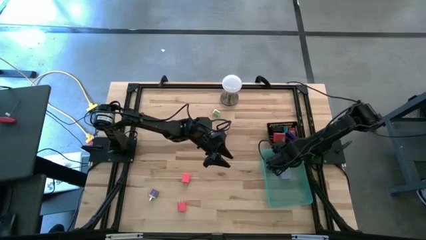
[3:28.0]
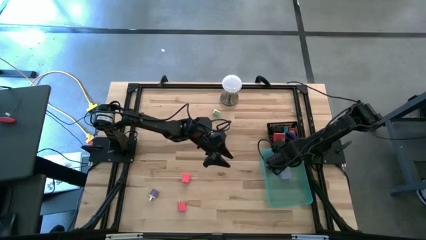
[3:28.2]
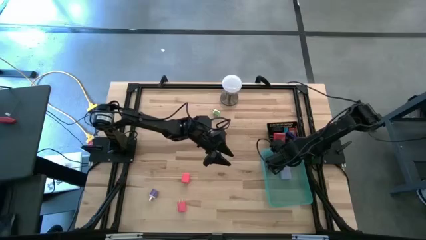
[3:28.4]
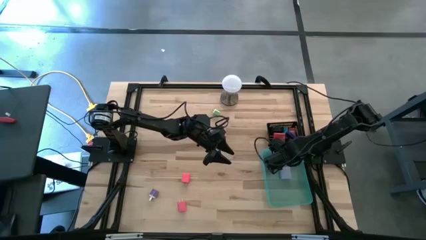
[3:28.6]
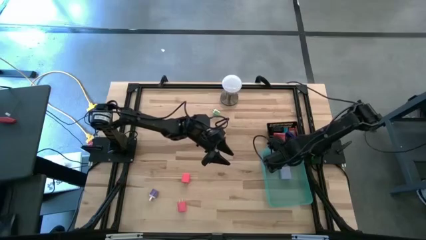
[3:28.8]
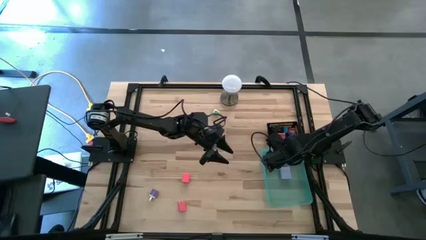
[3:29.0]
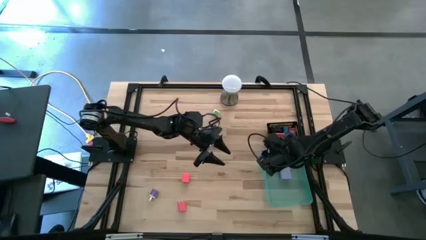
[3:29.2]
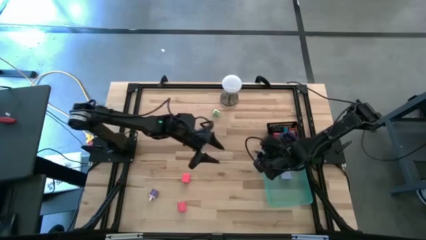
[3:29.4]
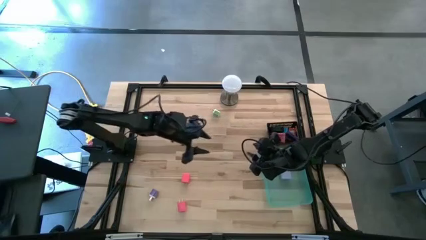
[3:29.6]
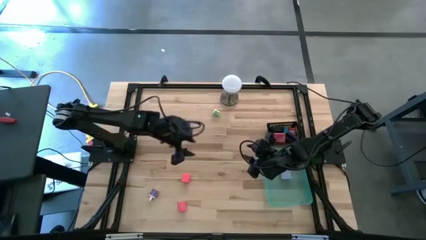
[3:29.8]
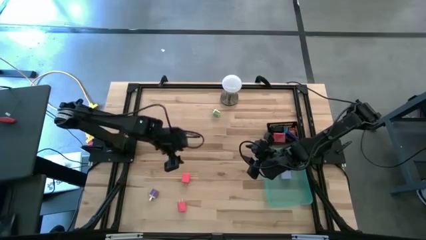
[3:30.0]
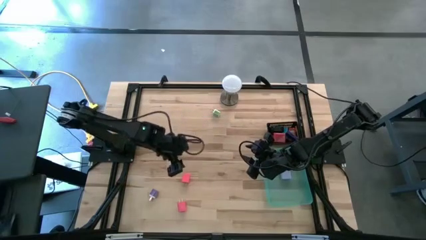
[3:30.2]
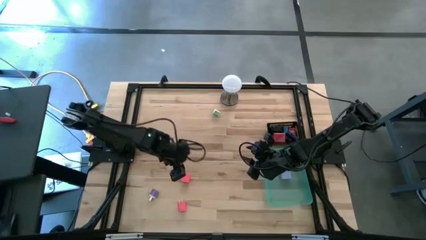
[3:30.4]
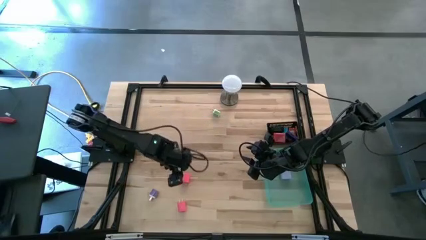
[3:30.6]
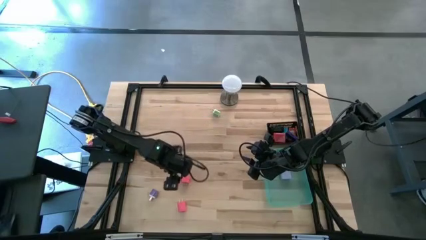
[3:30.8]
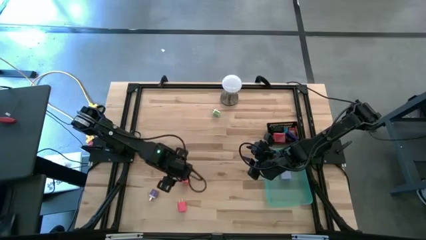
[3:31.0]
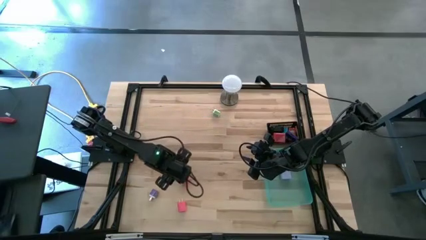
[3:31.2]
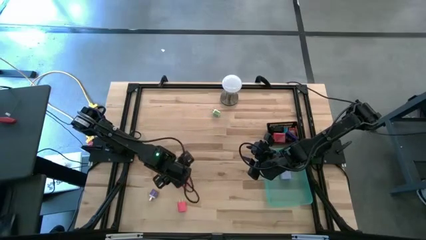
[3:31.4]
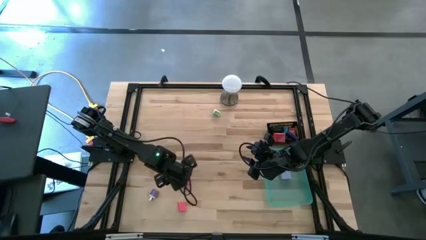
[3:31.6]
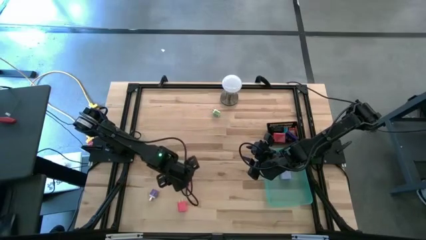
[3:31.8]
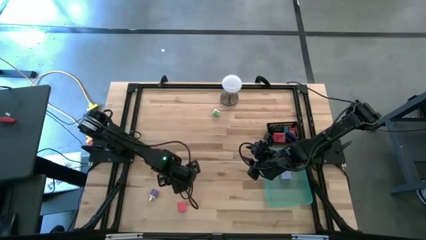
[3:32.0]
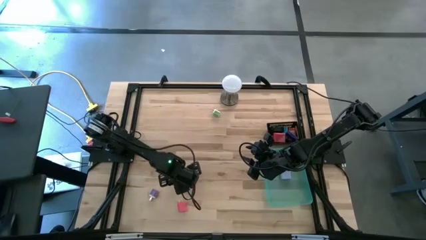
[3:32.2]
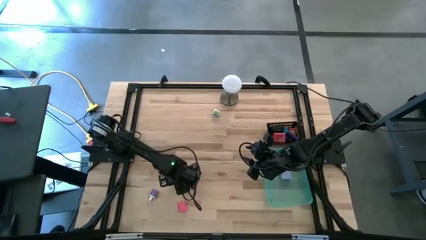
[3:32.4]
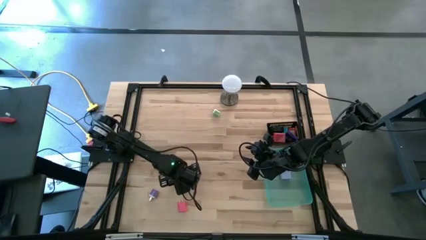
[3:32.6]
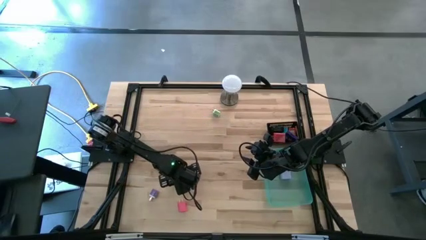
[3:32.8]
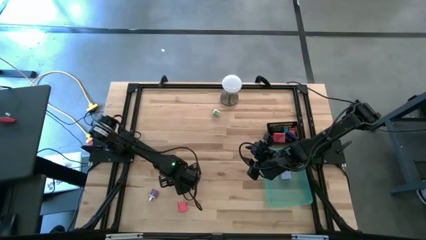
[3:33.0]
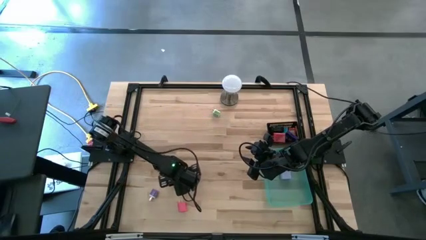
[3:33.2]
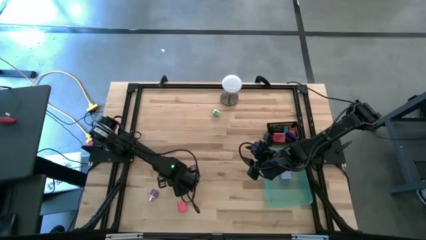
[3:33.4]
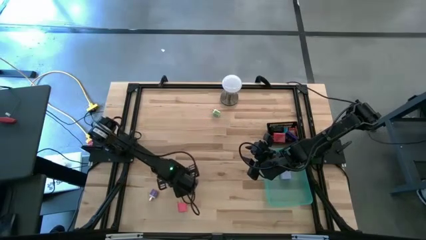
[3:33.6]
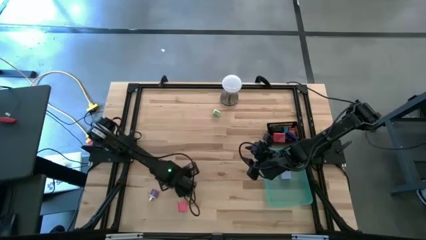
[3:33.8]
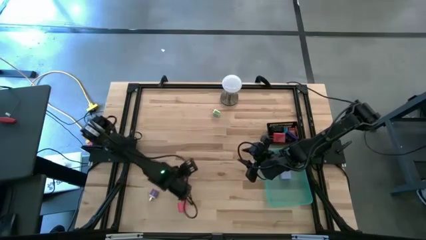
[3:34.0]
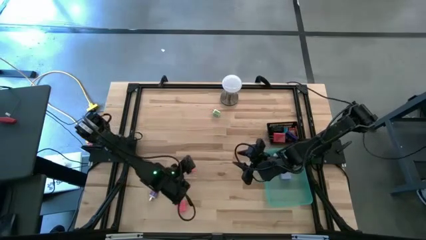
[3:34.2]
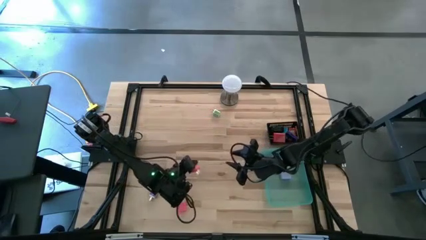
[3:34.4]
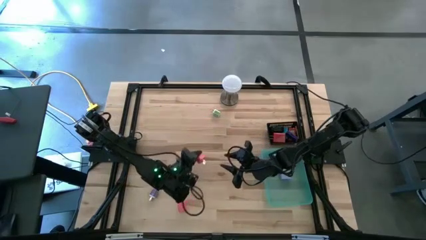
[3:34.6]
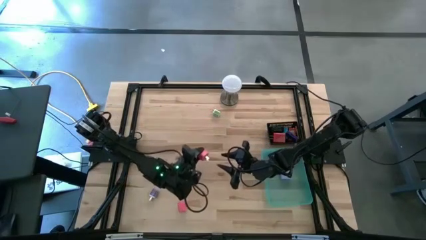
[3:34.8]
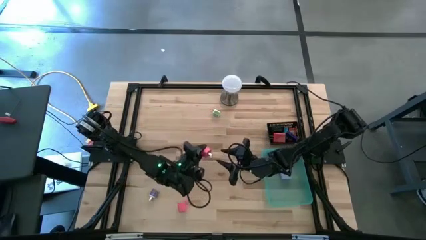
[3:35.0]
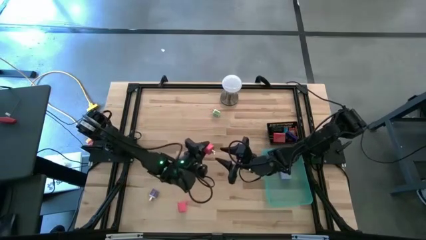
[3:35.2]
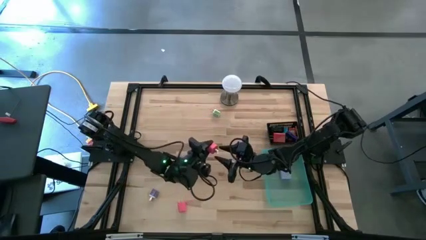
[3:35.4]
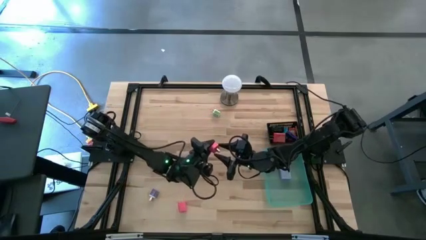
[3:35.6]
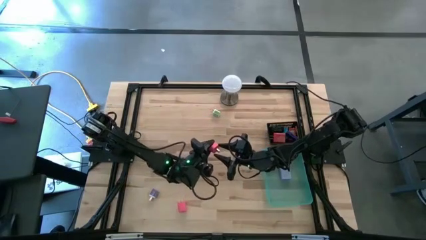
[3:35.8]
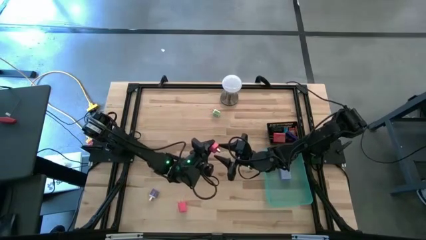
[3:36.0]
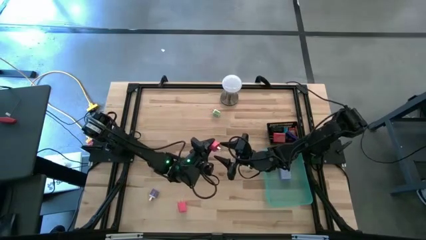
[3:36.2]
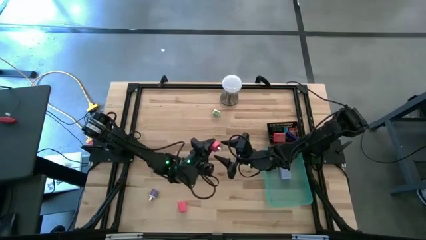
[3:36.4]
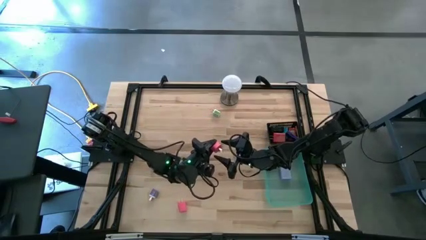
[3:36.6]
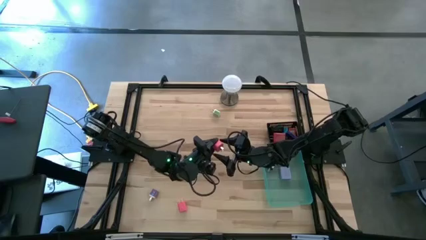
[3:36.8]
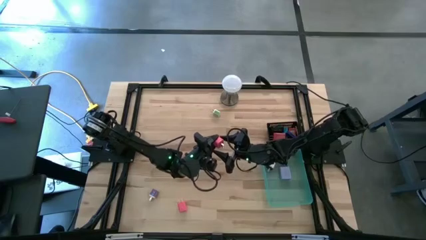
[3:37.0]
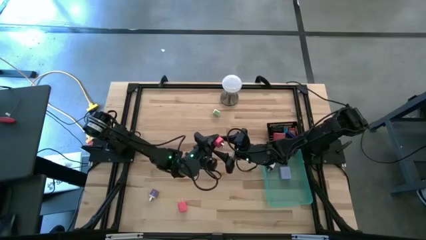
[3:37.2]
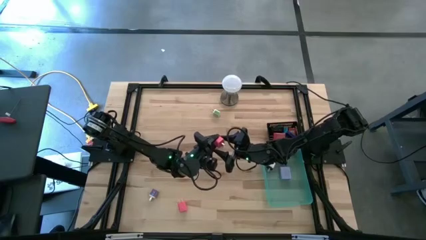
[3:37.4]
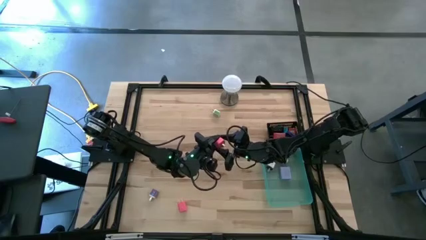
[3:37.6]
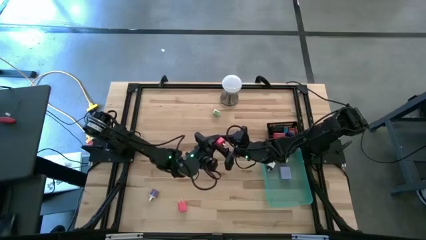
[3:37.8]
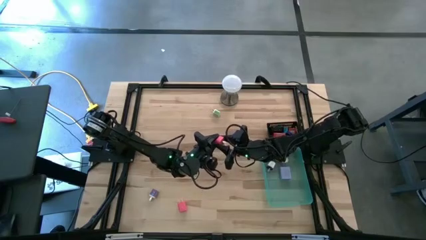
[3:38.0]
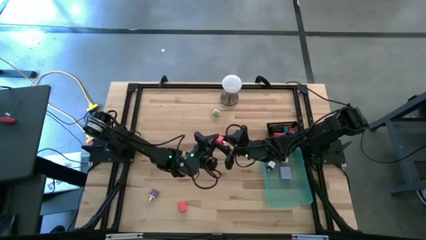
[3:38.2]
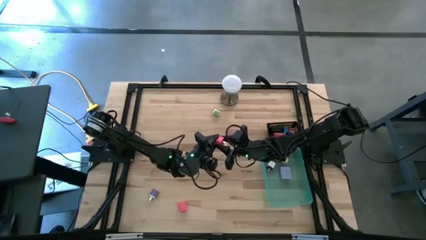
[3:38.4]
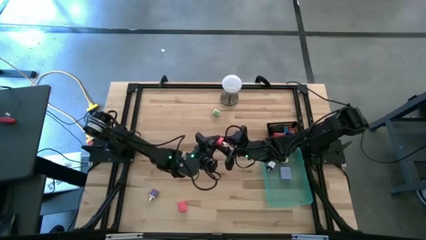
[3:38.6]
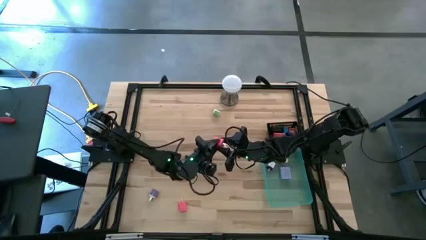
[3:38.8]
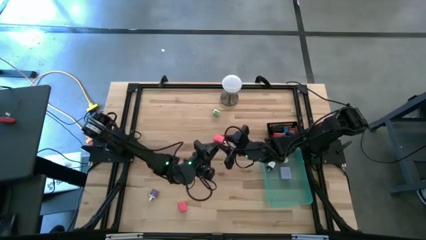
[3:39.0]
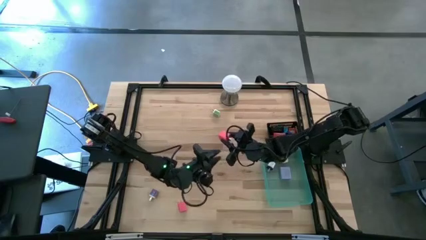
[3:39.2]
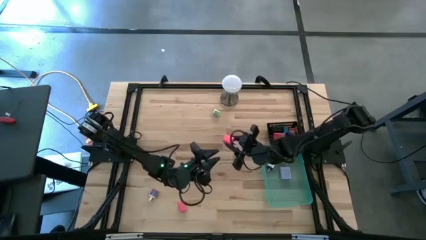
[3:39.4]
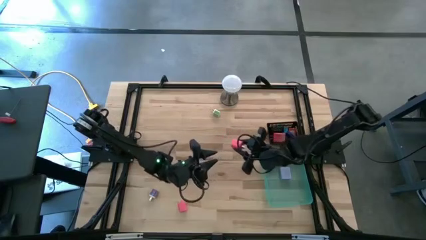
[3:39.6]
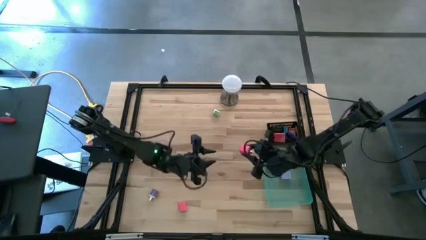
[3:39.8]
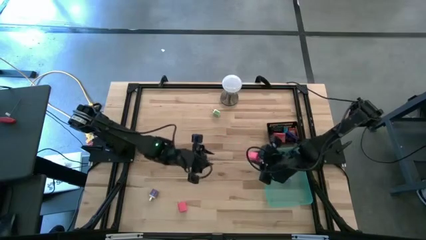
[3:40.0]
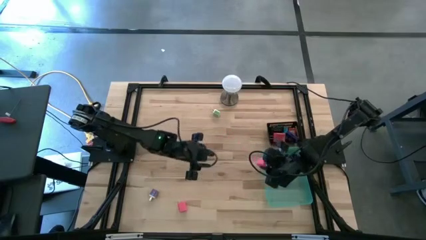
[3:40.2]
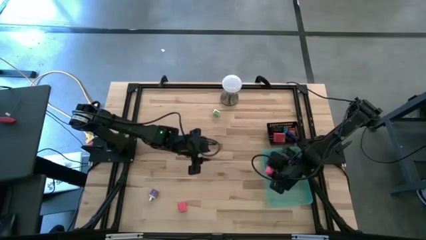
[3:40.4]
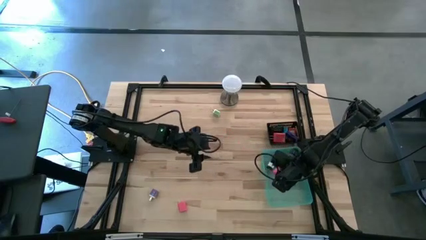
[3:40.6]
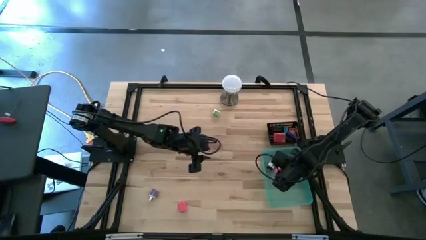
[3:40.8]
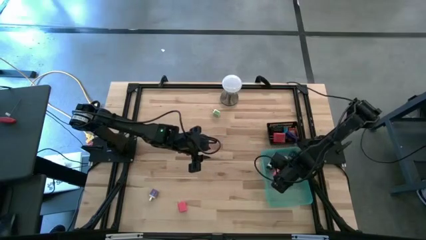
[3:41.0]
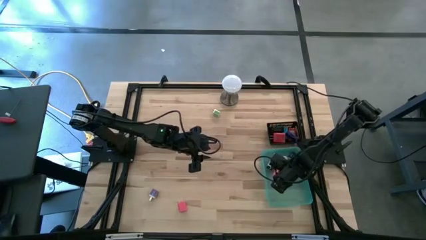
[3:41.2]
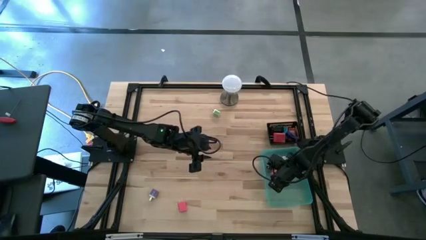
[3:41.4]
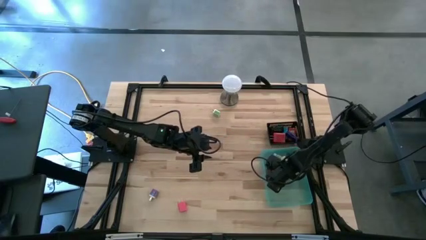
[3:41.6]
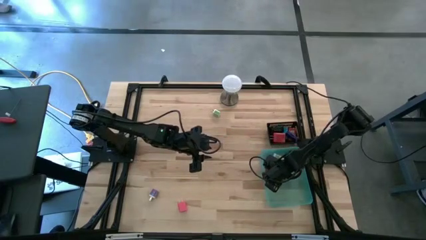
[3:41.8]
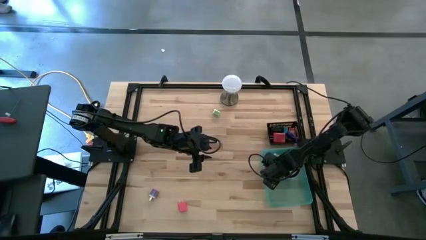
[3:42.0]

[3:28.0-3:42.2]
Task: Pick & Place Office items
Put the pink charger adapter into the green bin

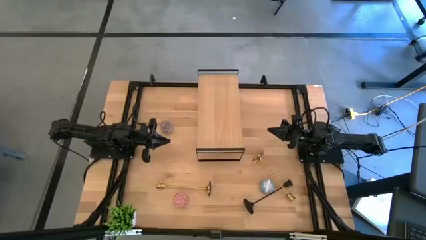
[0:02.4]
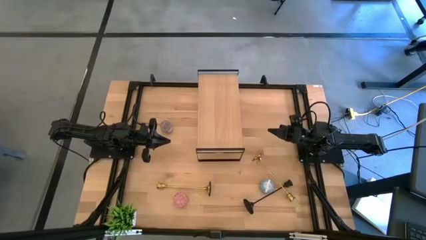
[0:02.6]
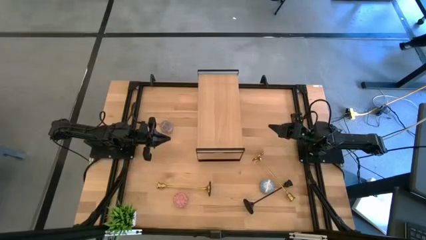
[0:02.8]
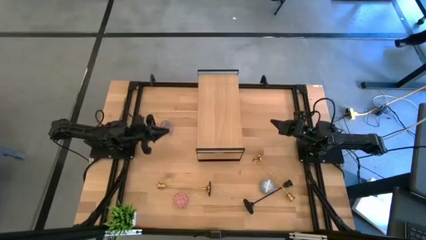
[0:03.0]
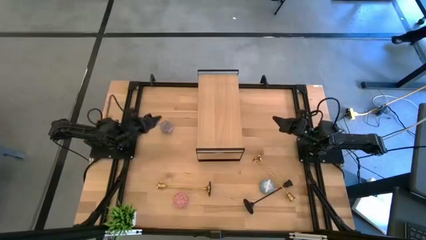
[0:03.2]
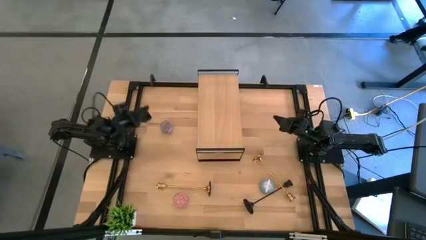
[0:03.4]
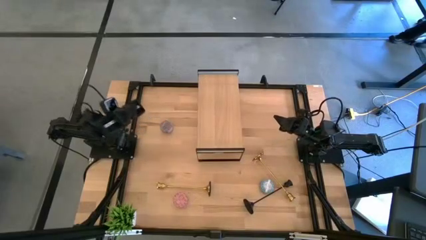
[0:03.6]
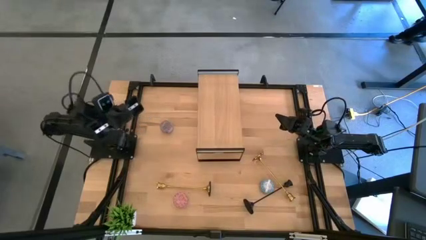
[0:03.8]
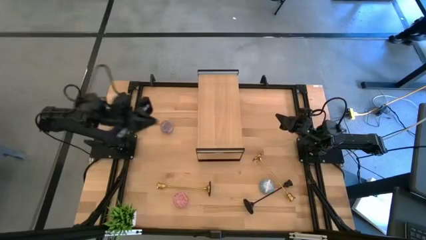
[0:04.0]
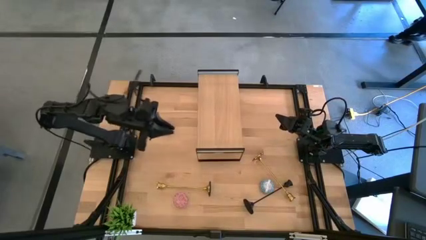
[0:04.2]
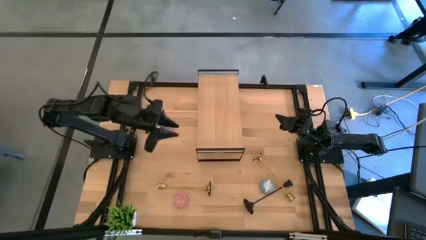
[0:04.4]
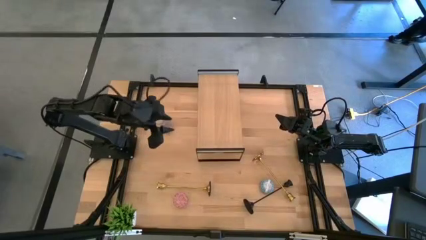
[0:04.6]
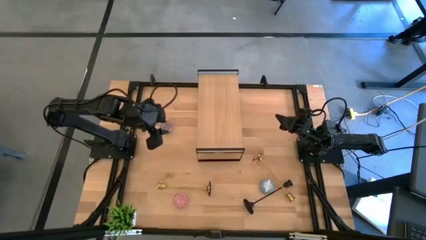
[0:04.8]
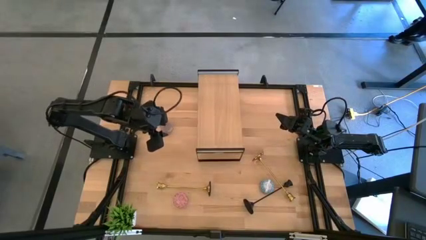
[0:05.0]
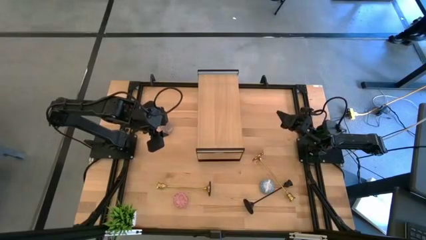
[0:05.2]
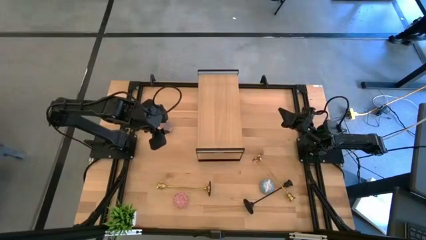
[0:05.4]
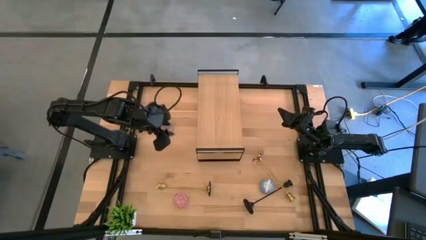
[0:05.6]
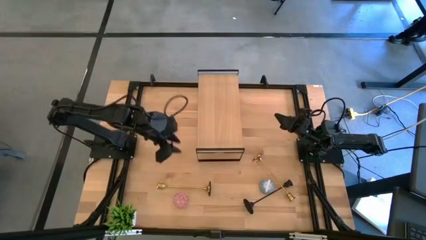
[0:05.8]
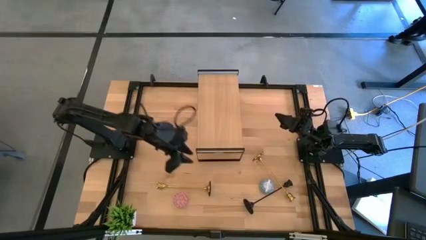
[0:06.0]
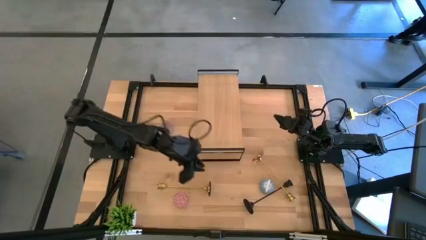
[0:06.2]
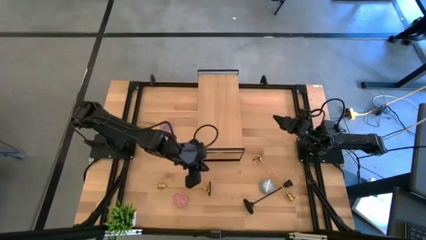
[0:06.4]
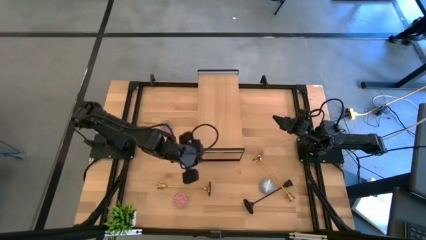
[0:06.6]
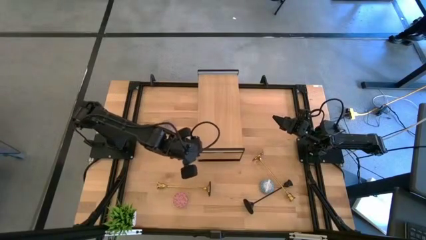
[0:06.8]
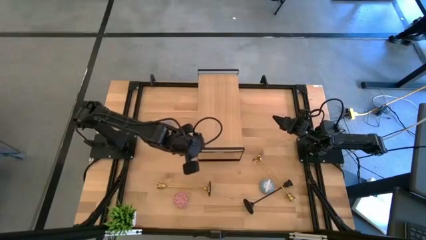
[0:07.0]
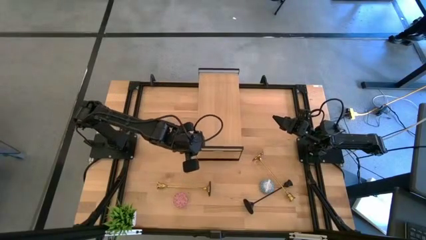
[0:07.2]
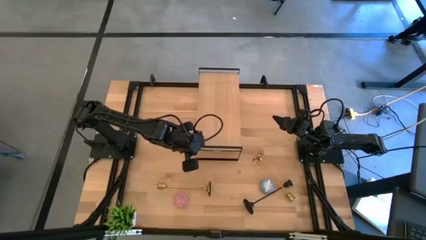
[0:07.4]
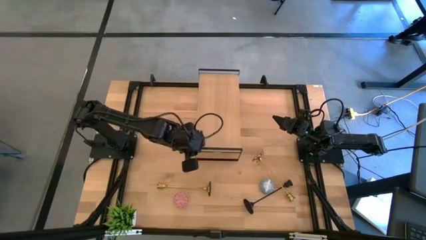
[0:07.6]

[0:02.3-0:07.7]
Task: Pick & Place candle stick holders
Adjust the shelf
